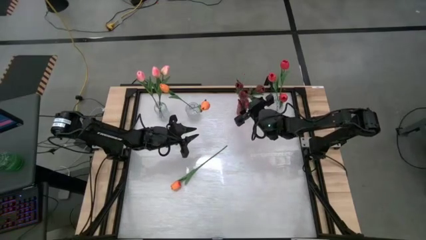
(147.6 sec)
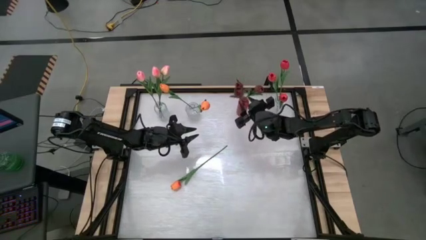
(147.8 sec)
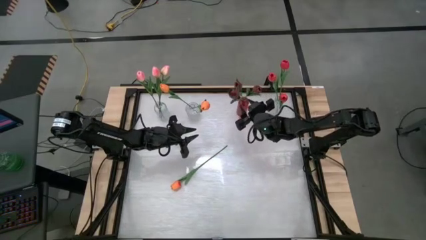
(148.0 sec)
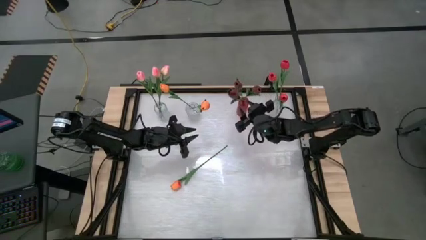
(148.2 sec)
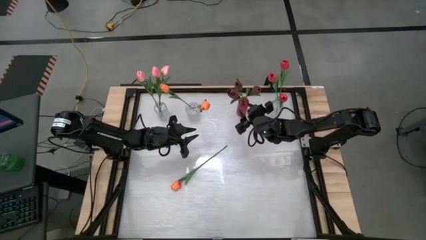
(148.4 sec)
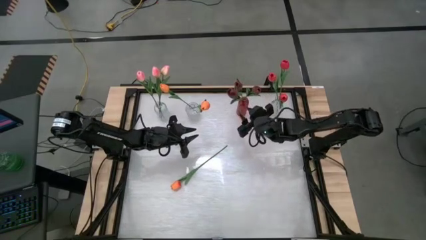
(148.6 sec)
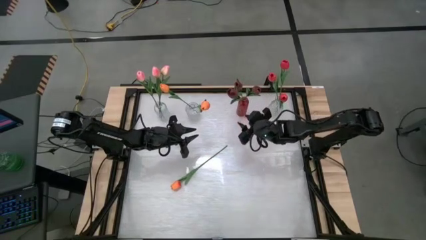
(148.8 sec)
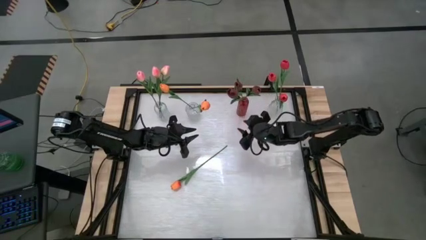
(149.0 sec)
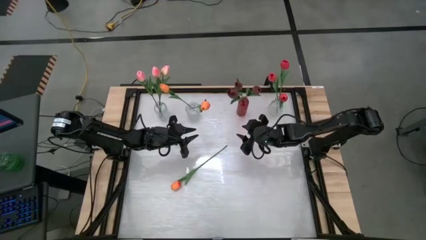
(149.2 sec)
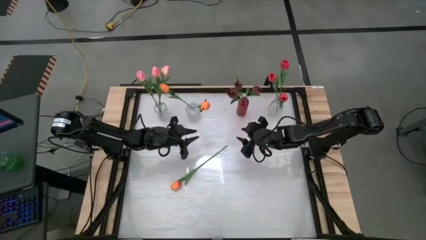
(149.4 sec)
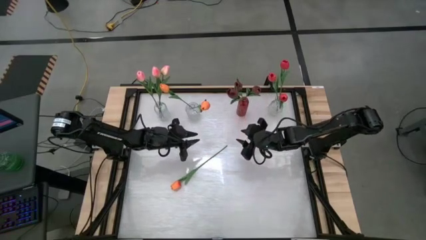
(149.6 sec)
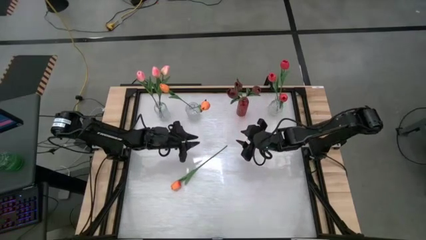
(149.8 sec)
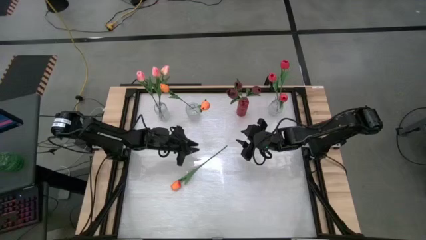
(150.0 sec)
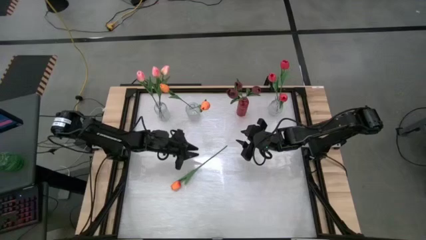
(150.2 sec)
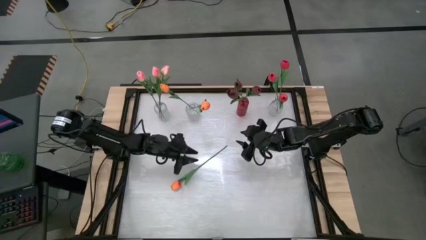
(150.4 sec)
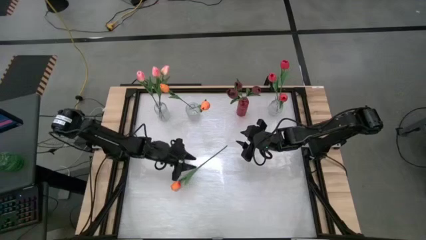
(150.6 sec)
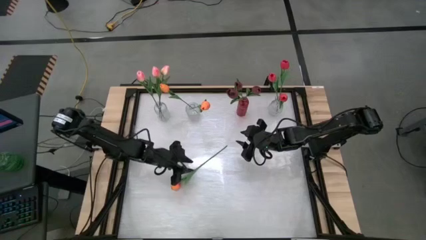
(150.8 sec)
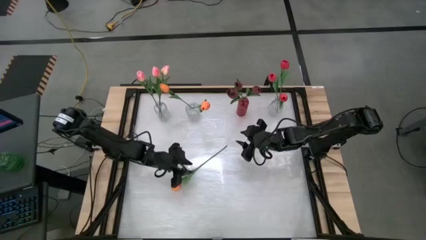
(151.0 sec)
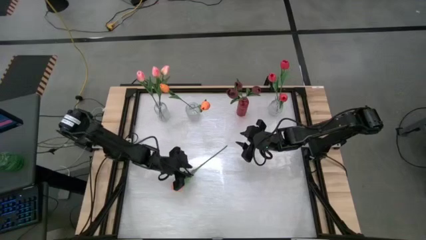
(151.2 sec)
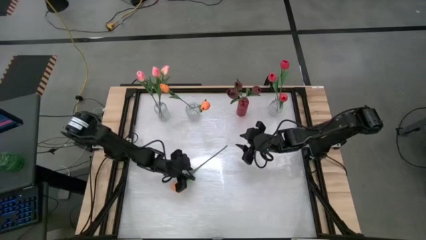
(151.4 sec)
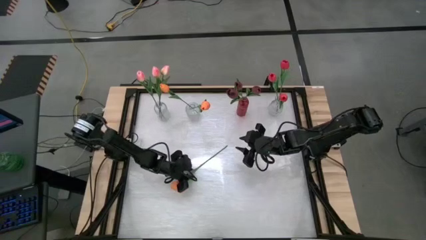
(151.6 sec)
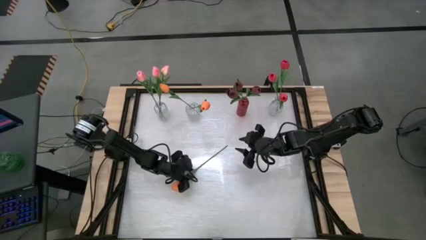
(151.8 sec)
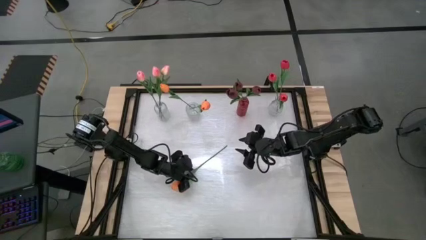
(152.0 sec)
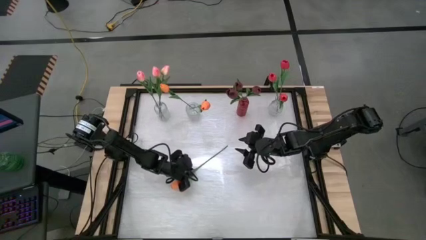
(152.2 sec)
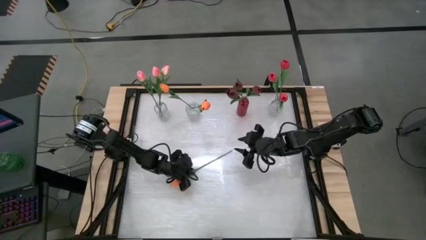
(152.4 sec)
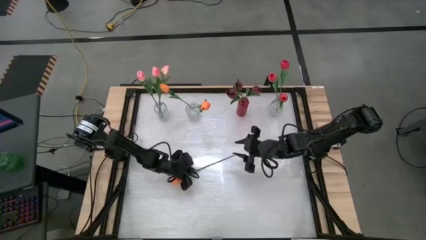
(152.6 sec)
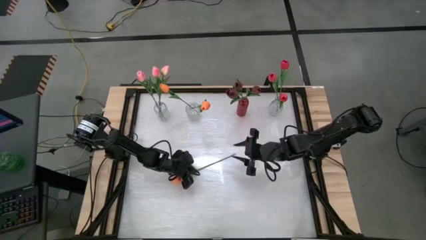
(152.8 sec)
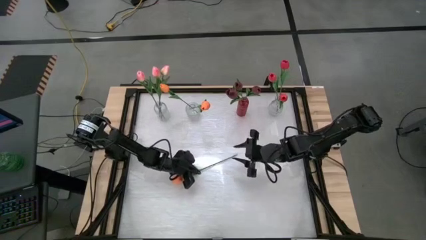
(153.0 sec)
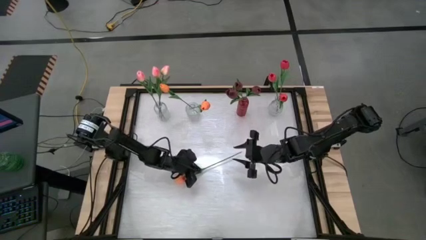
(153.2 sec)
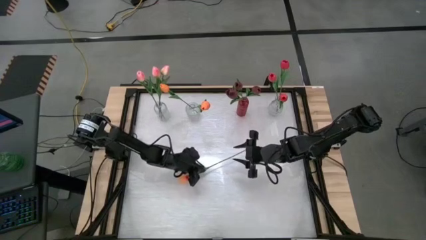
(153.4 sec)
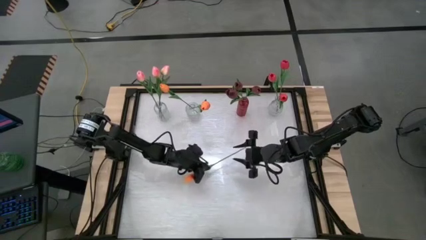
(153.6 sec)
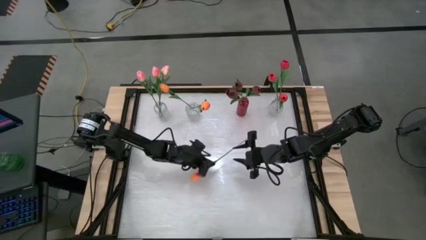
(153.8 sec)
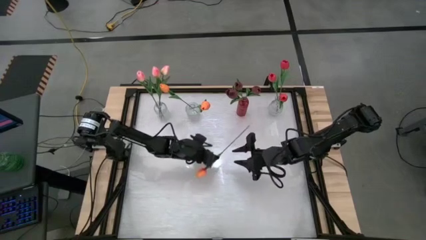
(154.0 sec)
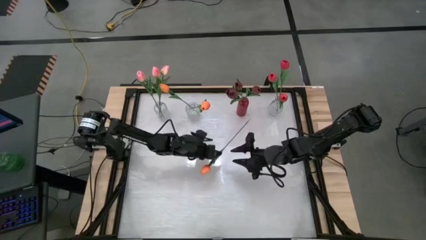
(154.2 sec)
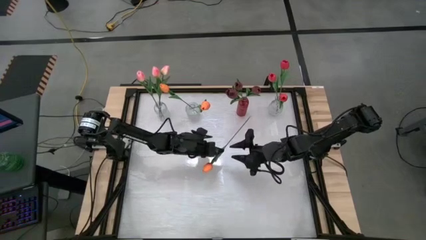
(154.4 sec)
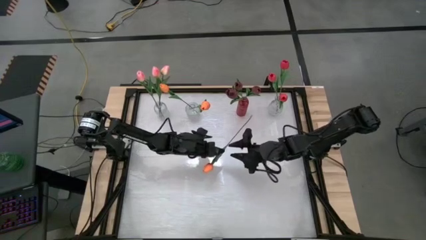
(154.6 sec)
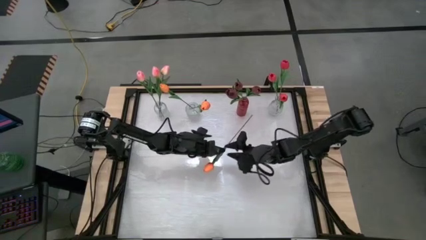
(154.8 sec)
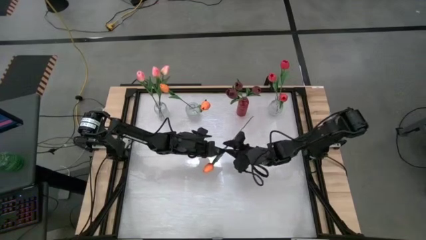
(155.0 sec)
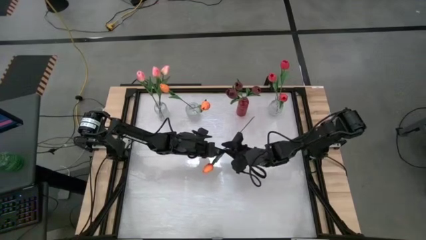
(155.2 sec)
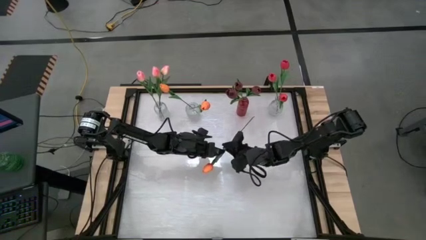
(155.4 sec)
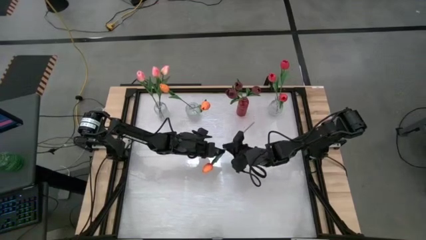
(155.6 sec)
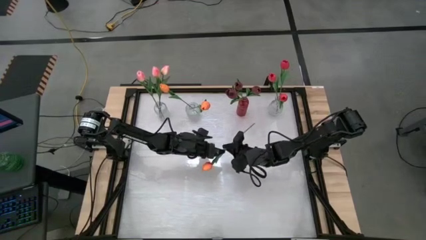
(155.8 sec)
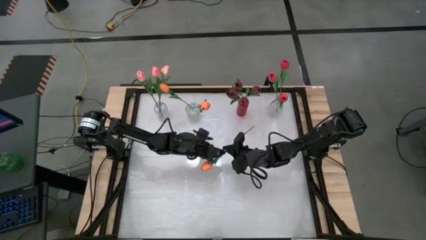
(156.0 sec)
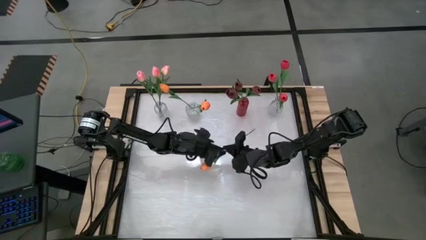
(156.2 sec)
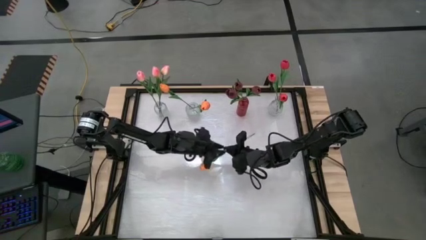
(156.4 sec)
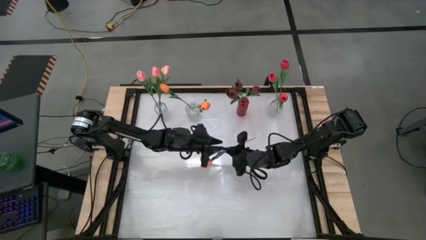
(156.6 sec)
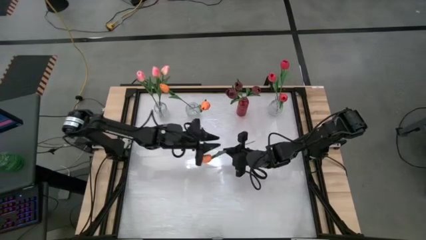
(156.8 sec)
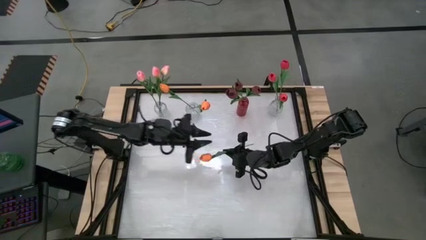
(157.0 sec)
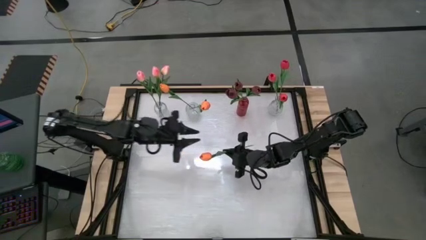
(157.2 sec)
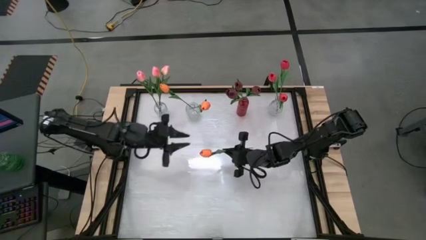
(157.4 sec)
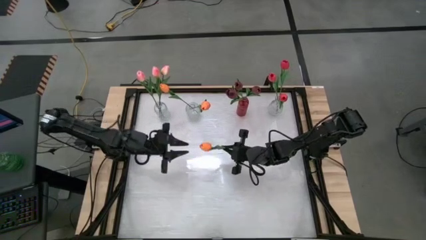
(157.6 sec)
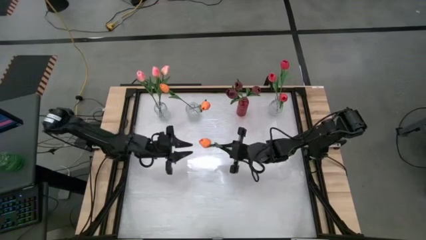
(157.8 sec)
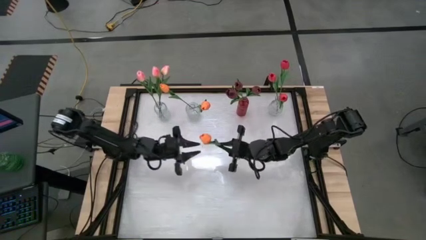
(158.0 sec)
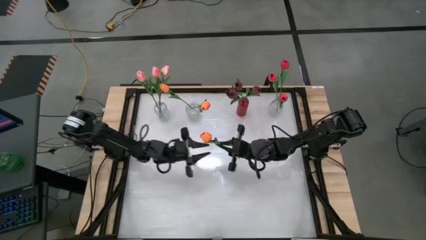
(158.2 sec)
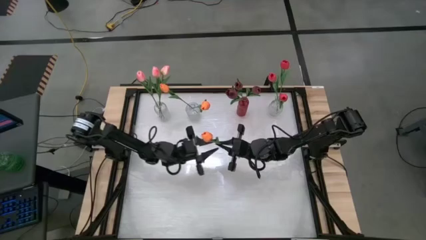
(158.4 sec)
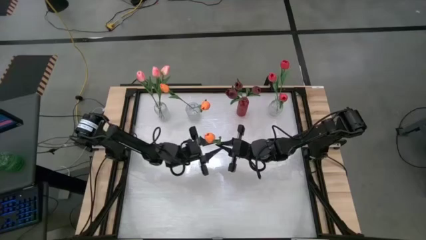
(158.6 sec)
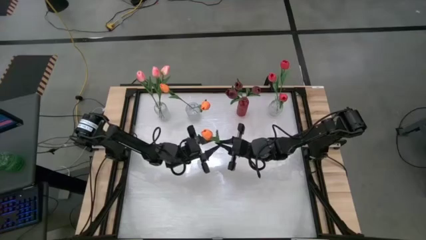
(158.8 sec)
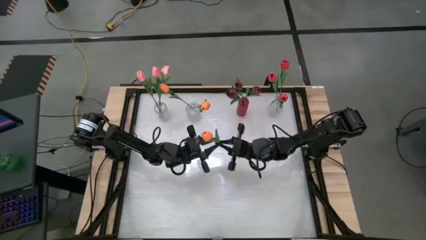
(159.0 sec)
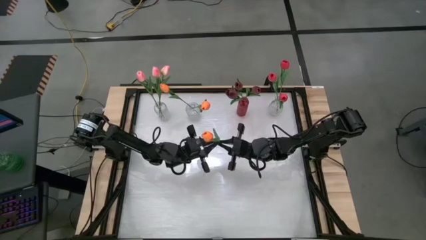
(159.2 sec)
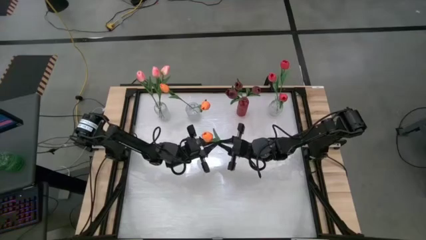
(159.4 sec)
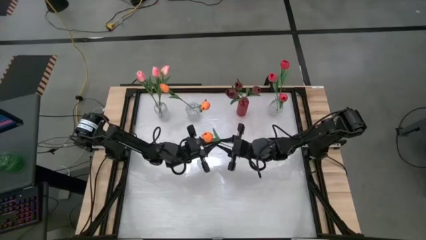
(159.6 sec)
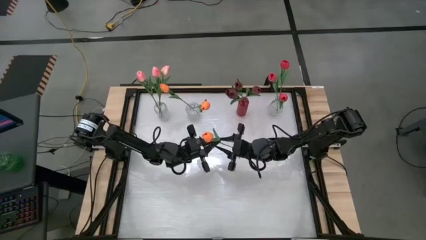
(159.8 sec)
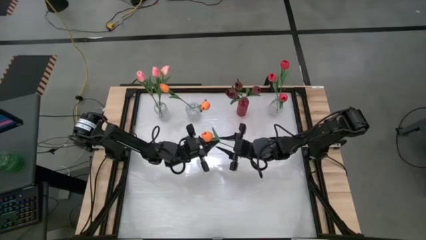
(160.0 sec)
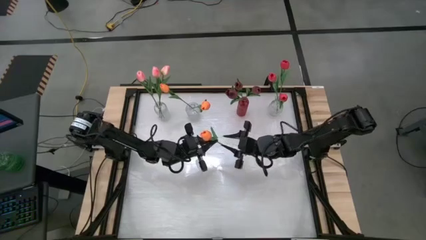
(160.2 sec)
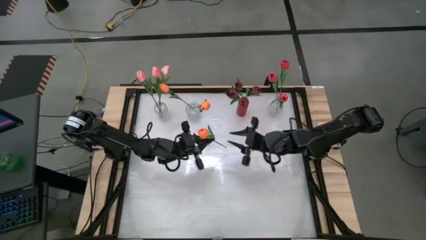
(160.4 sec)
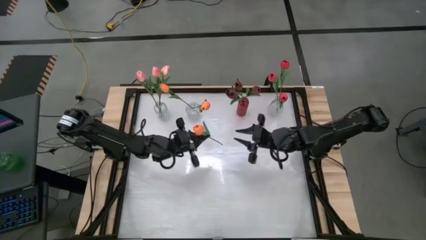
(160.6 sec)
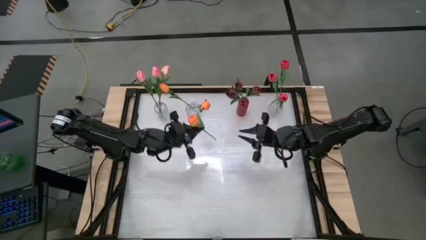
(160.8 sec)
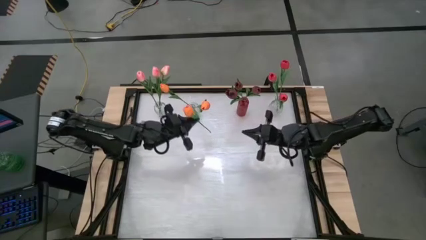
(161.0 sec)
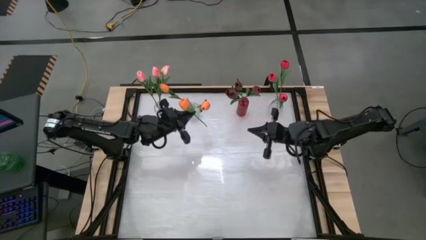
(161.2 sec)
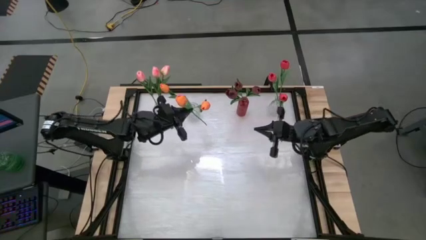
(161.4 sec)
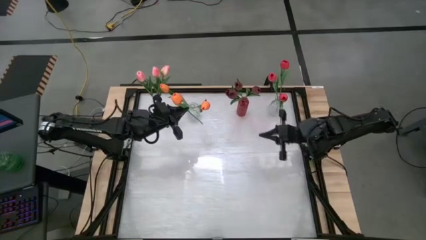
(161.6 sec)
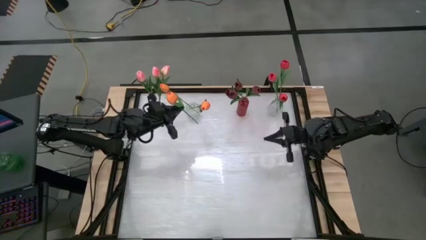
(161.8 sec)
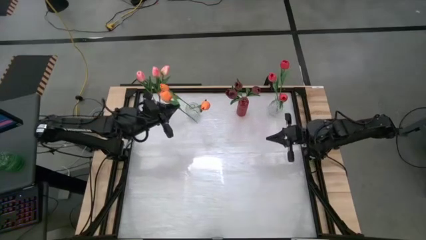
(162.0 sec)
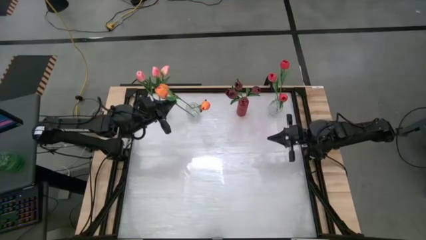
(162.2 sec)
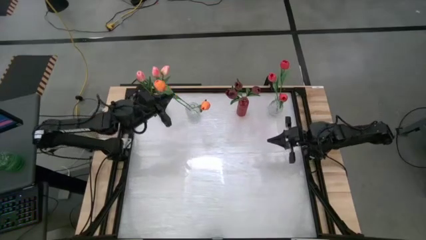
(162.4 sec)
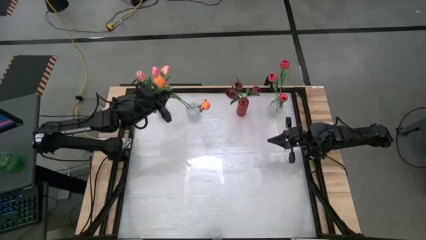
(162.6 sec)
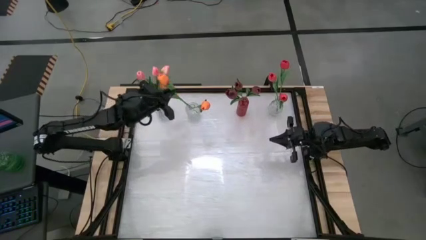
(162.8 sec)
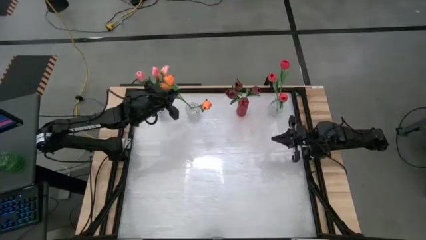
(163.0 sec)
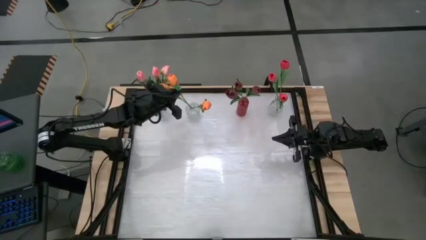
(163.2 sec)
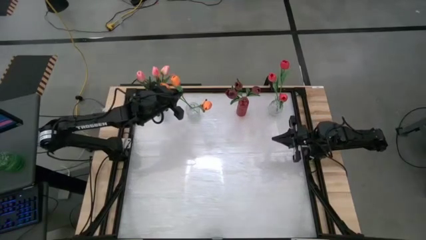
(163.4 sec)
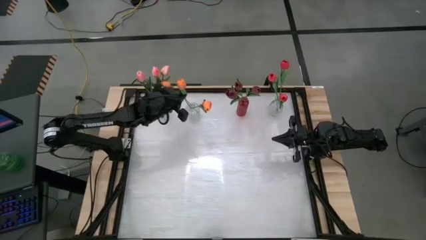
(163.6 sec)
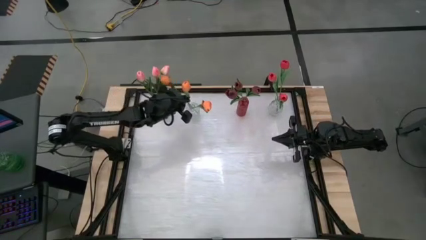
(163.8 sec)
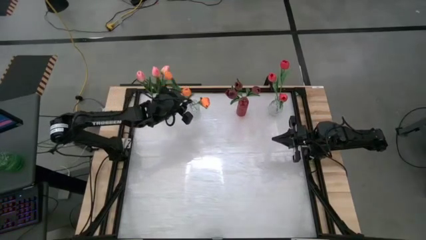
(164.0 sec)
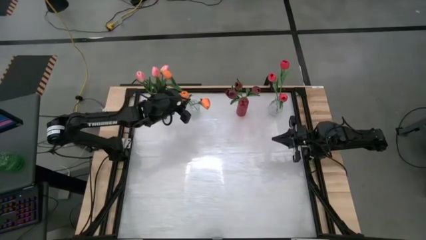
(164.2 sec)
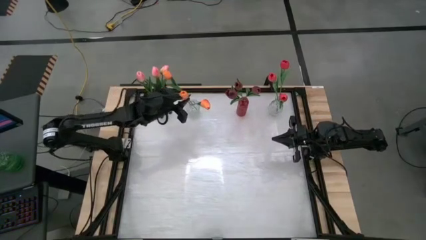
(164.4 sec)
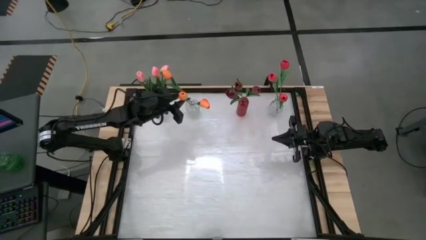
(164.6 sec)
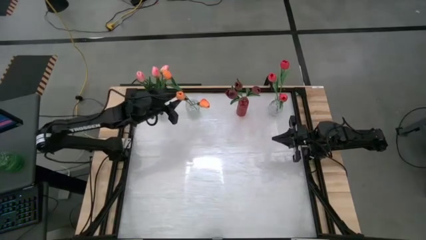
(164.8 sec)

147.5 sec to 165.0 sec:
Task: Sort flowers into vase by color
Put the orange flower into the middle transparent vase
